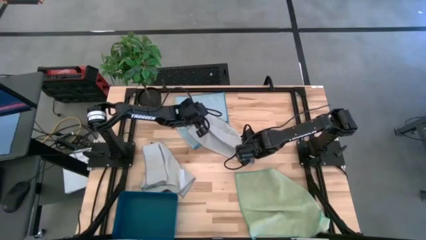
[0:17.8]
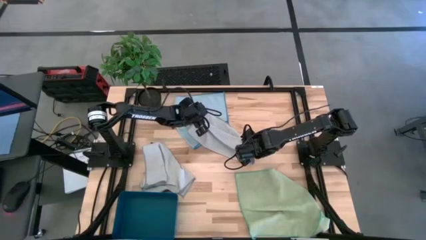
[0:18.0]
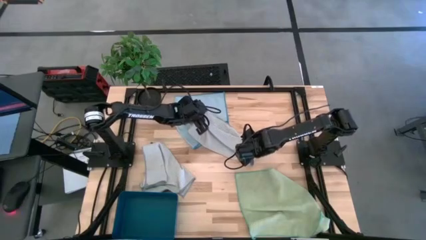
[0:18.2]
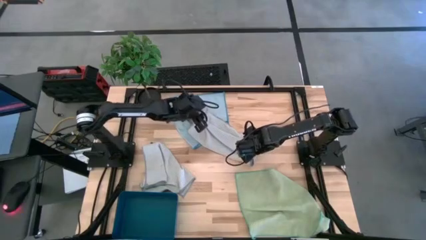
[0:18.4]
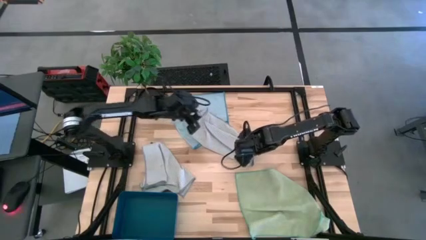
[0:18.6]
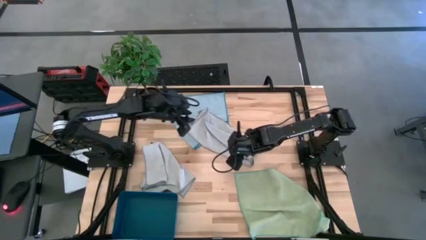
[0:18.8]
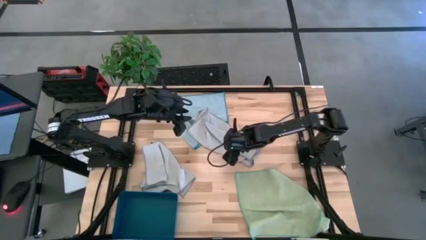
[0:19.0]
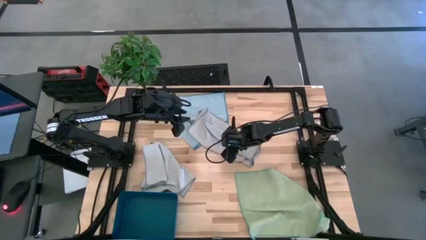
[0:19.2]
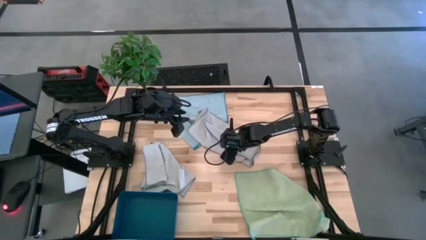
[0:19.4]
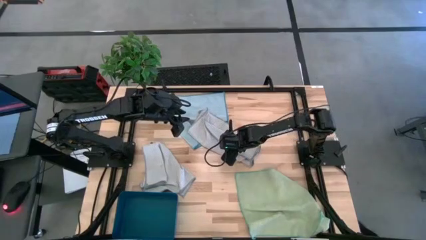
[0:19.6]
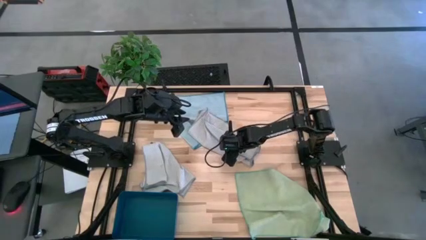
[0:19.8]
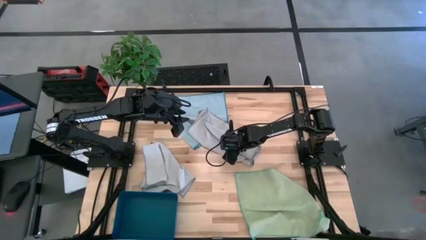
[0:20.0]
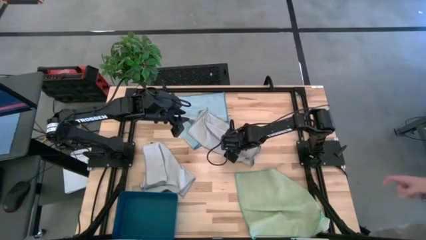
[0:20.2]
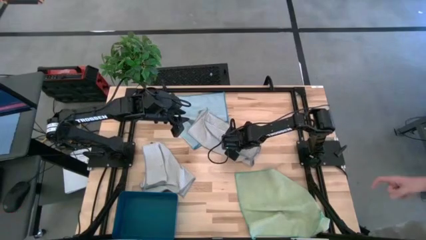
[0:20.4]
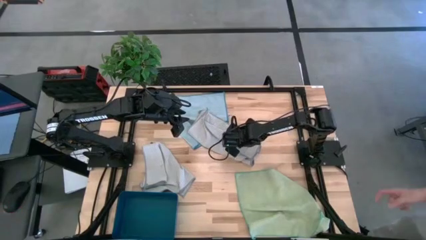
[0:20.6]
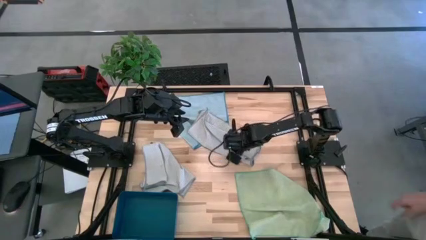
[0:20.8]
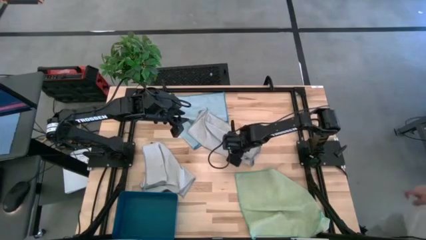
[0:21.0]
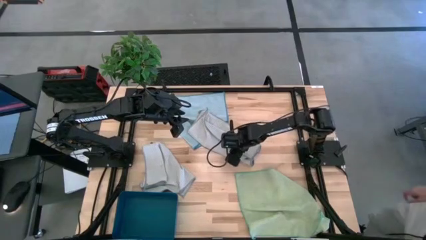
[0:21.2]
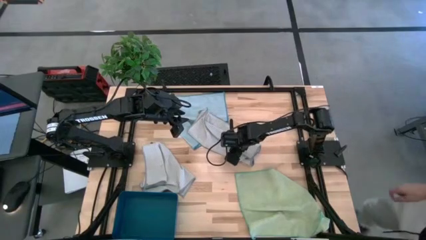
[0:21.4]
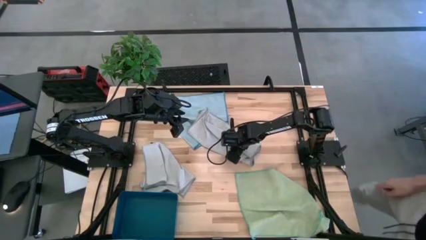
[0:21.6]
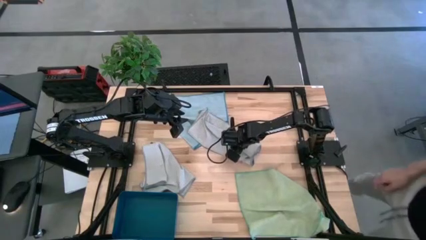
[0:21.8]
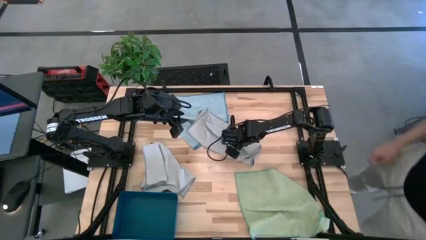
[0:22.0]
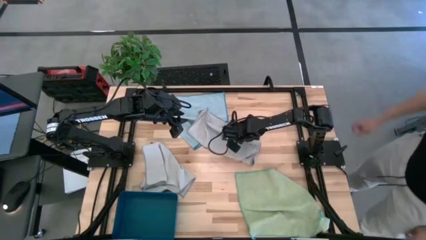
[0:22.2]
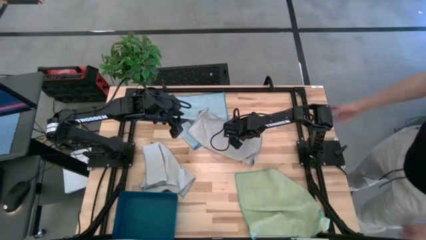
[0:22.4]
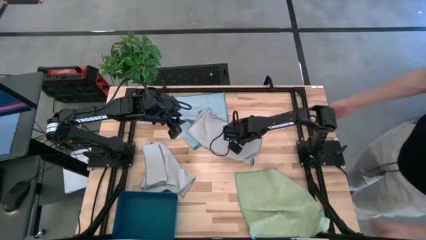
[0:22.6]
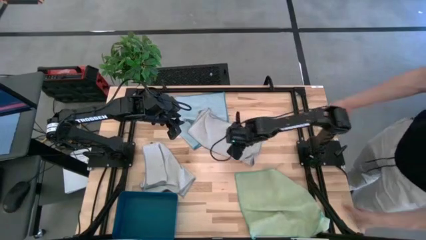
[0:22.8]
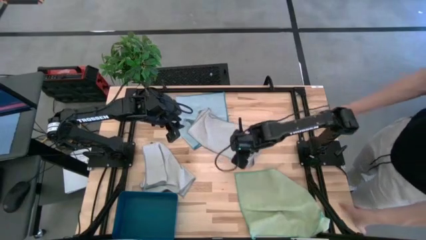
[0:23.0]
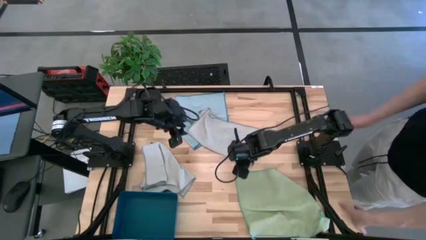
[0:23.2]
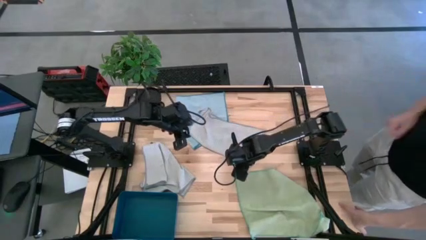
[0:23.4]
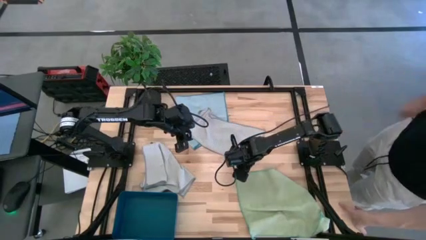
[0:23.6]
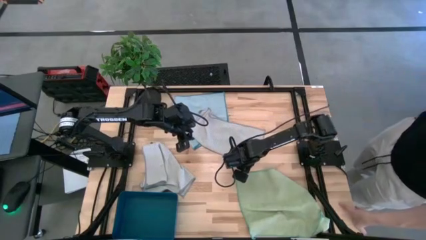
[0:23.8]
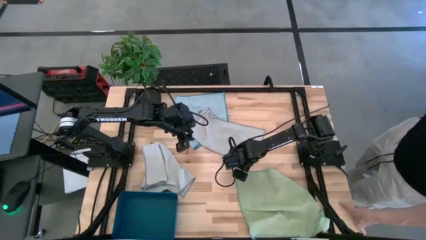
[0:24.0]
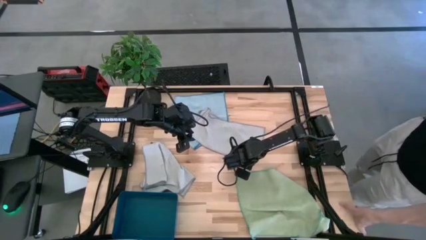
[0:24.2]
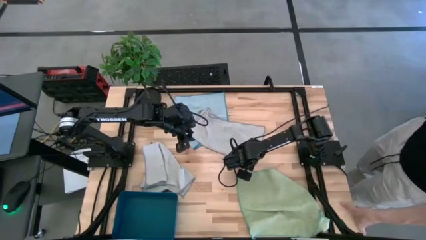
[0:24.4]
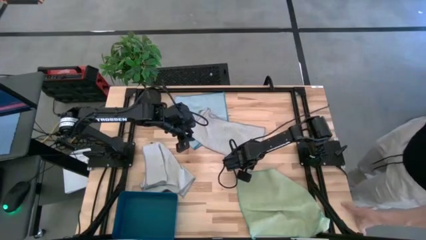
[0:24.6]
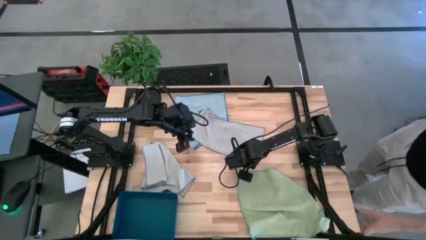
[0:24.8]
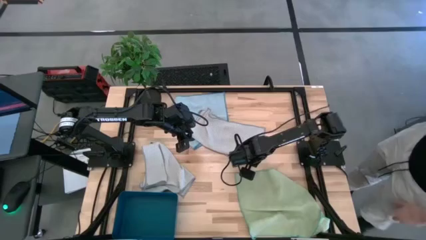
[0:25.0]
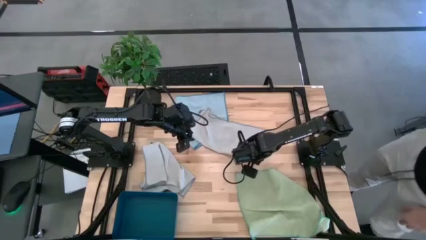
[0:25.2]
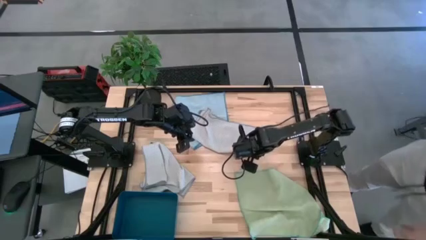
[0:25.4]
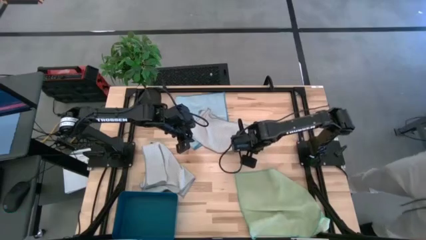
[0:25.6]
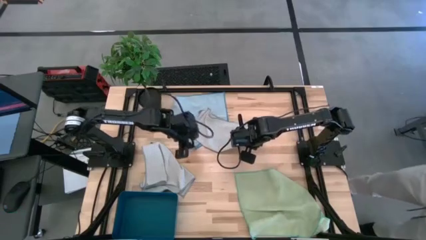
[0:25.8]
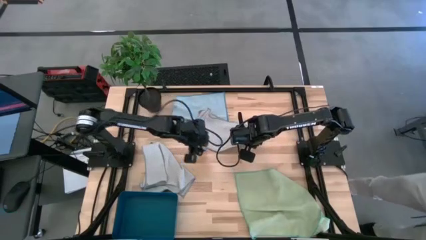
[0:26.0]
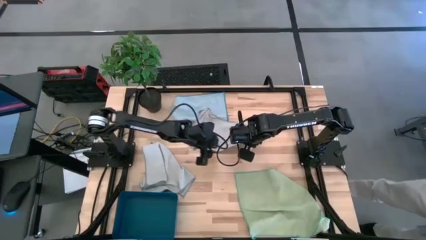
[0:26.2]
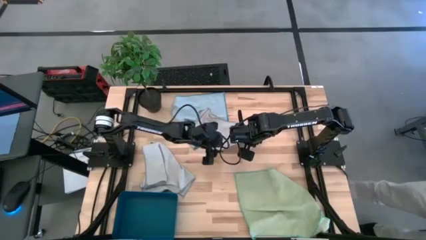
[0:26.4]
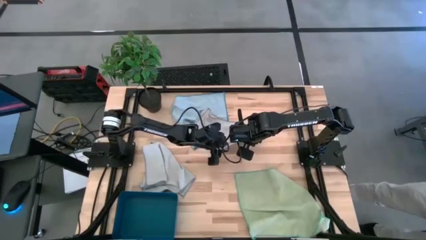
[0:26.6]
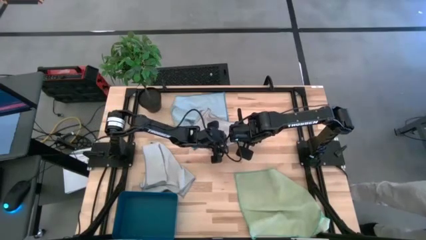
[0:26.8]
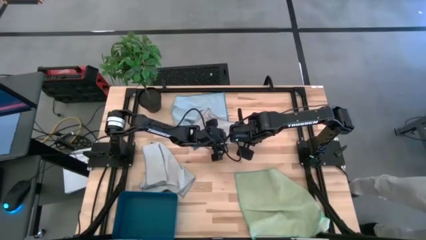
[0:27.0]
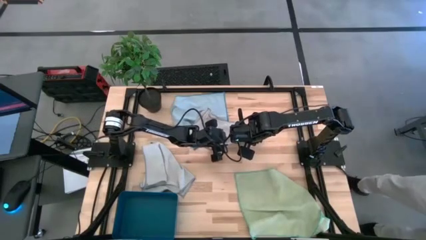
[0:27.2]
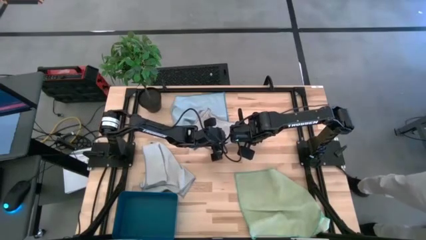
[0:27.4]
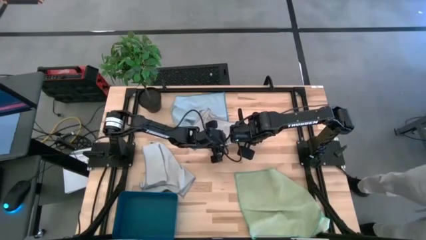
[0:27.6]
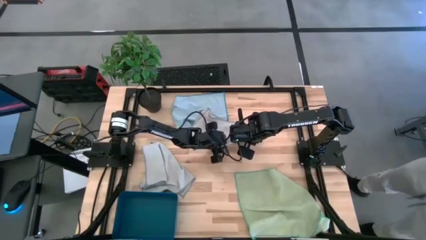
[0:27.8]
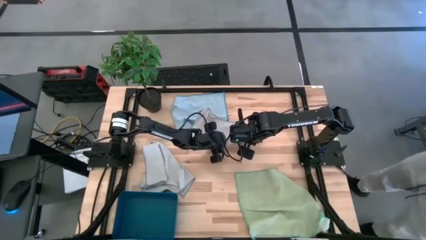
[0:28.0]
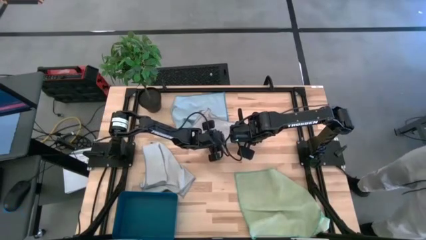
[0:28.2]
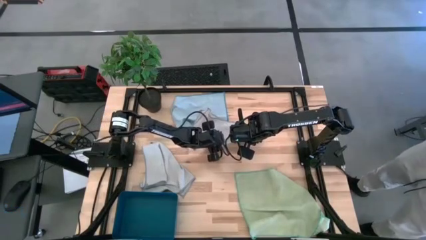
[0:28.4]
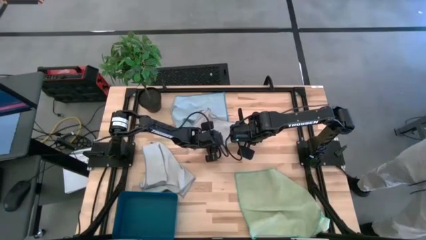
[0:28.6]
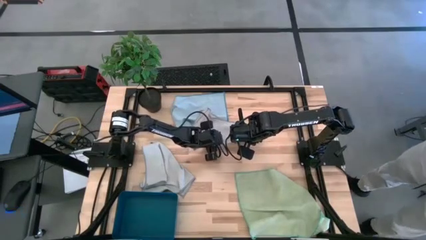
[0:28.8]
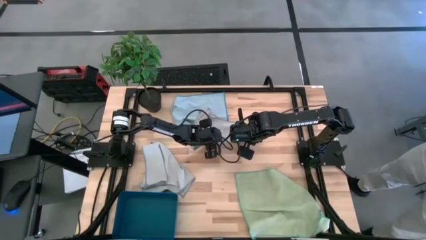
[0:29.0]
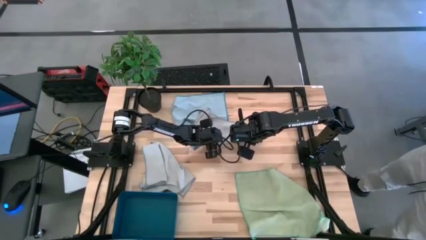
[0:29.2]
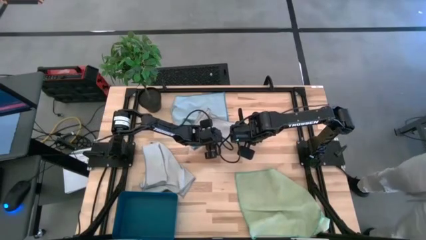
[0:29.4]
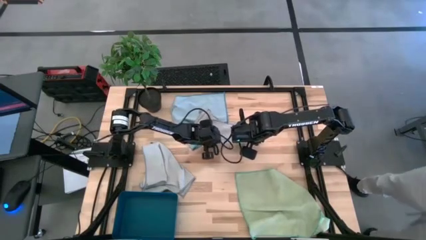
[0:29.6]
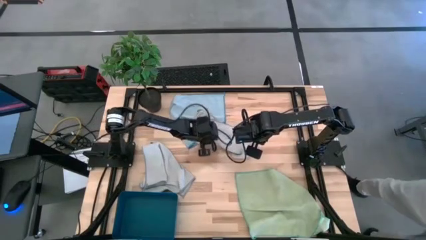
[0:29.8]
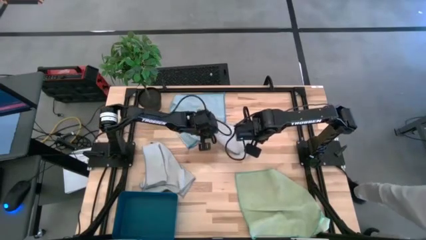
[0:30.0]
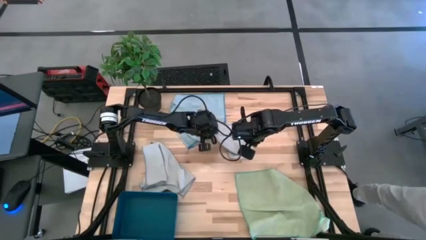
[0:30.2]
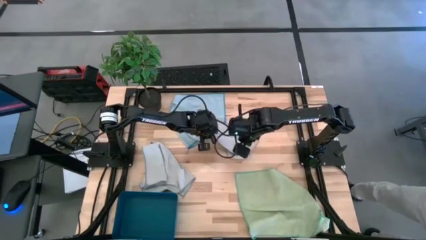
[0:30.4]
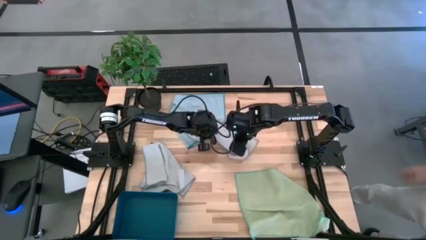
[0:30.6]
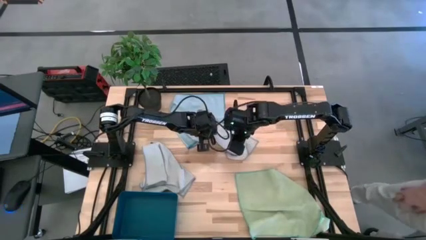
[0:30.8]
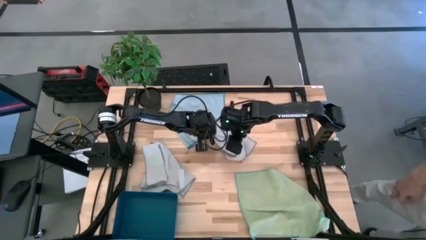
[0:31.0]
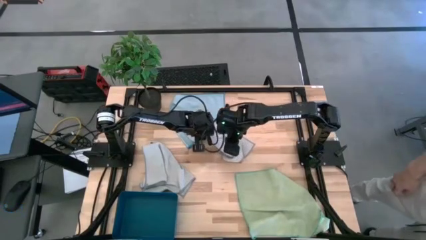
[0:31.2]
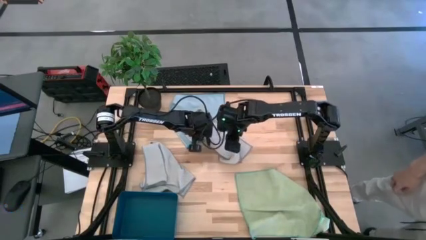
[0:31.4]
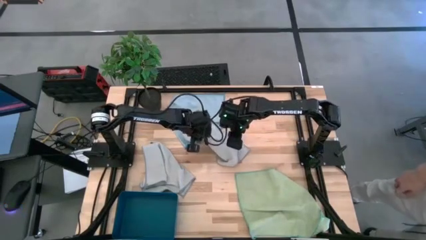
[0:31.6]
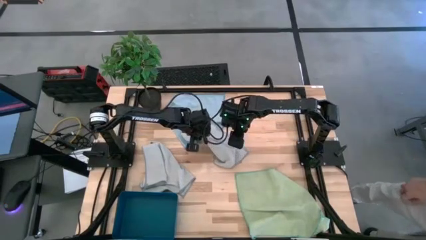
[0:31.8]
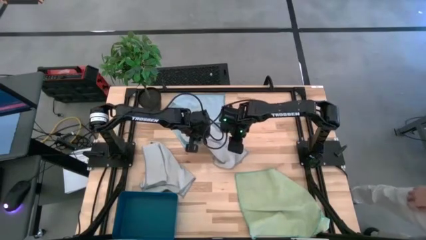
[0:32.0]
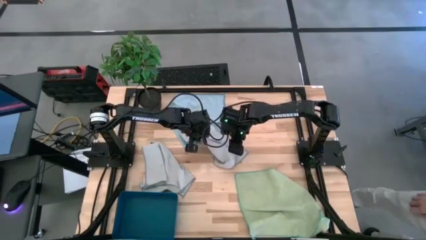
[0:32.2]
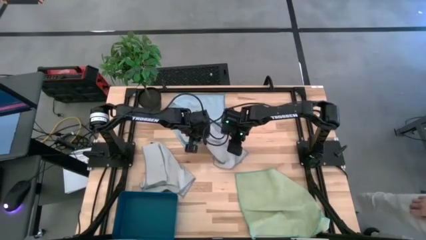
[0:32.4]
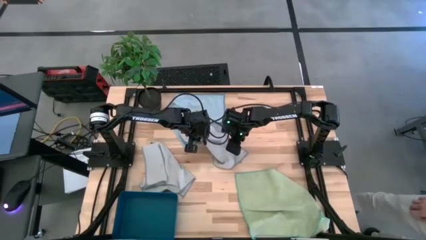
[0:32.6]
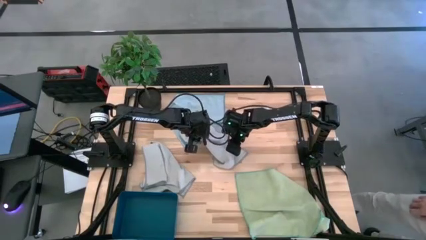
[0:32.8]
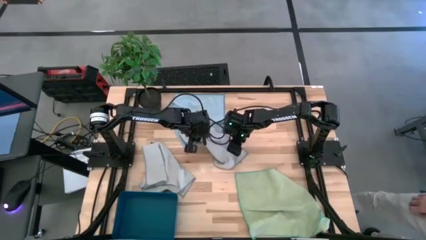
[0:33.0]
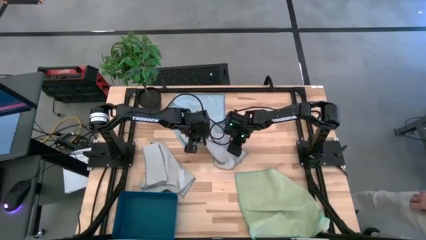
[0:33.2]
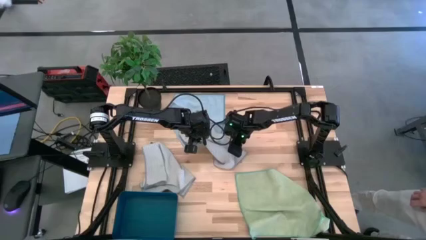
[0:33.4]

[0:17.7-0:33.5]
Task: Fold microfiber towels
Fold the gray microfiber towel
